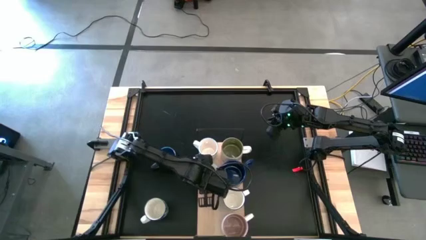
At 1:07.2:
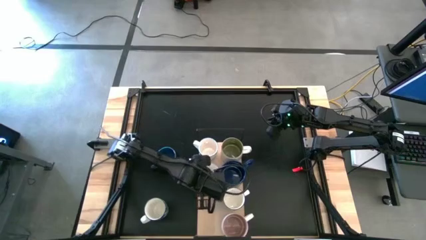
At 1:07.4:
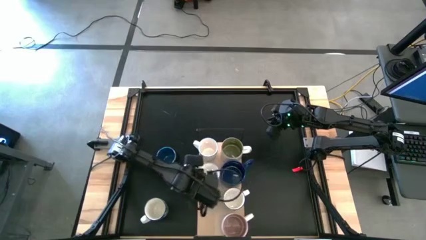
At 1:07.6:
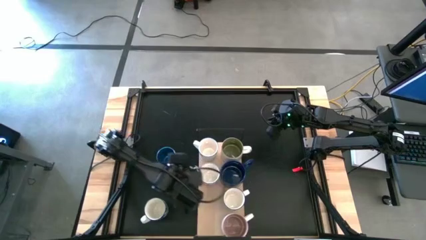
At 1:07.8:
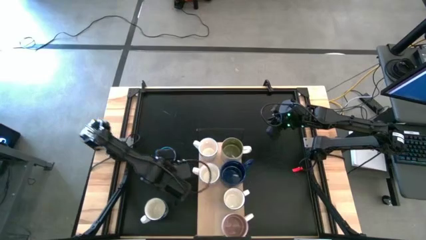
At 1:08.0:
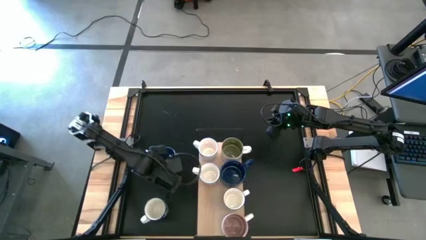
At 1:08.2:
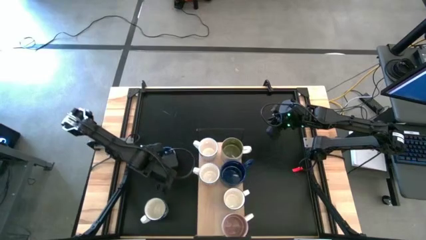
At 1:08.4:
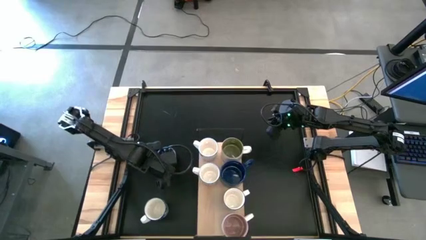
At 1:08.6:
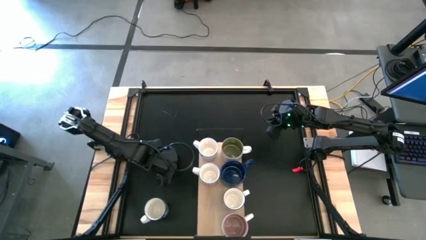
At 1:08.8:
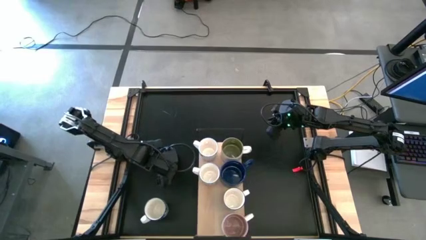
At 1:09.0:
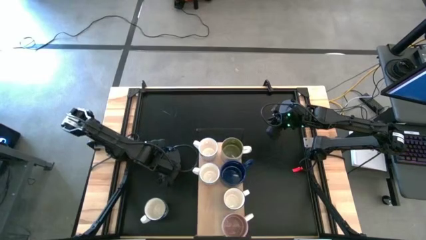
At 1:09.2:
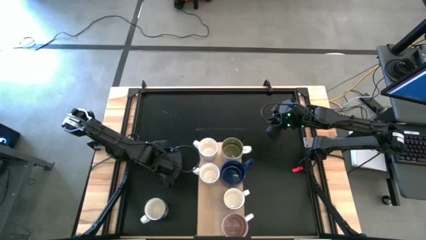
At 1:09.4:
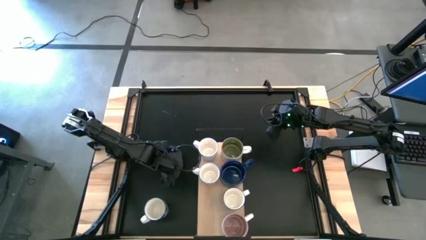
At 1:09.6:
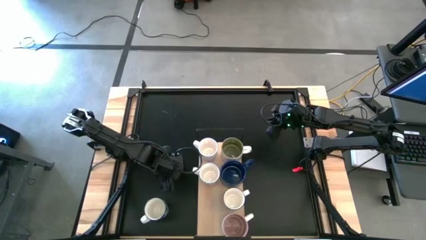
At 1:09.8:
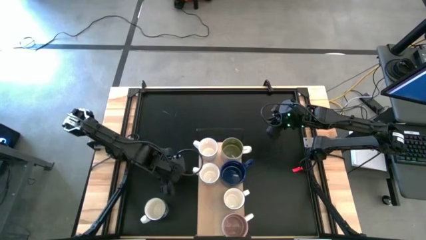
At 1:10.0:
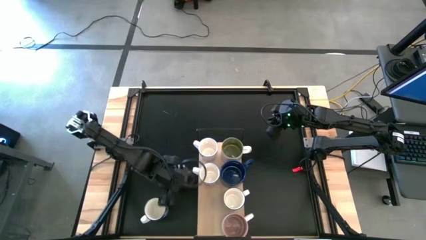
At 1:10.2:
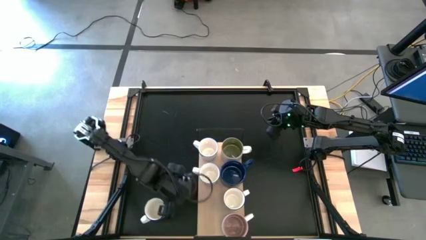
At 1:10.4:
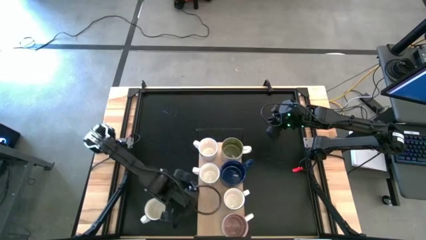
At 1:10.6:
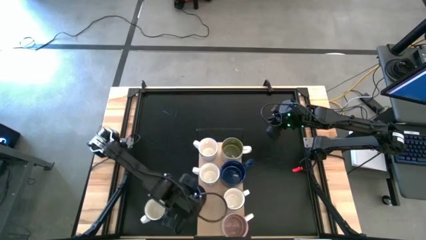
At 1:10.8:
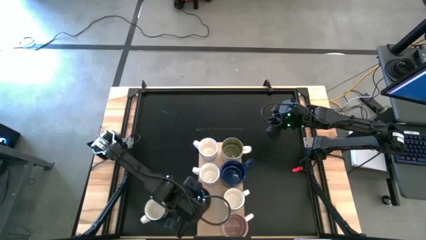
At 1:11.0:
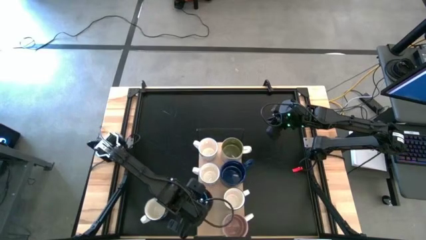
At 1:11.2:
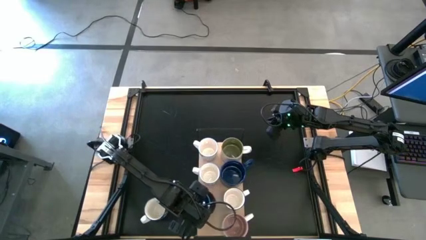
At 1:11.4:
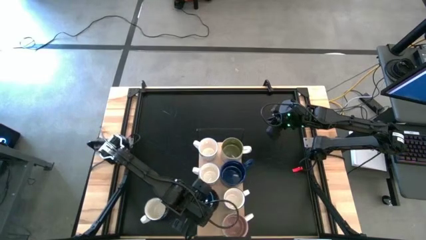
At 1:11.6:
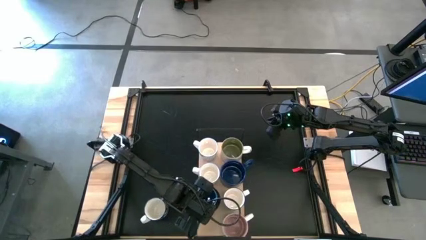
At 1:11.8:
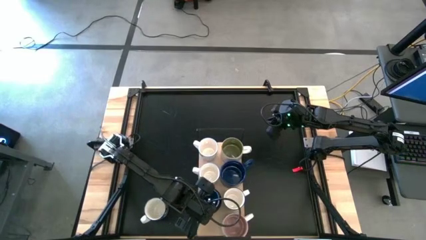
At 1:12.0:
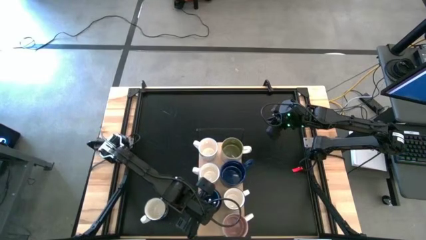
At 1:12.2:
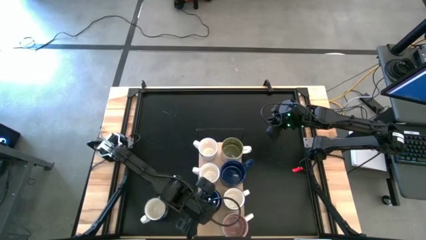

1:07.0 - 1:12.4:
Task: Place coffee mugs
Put the black mug on the shelf

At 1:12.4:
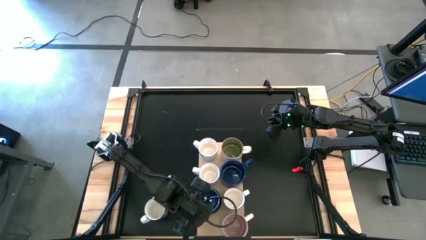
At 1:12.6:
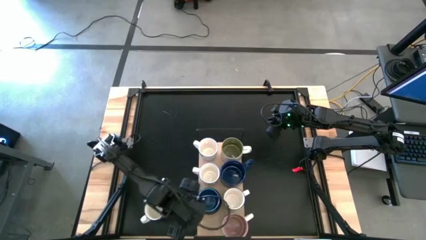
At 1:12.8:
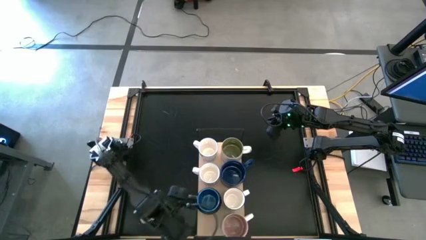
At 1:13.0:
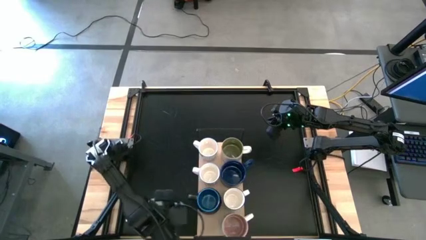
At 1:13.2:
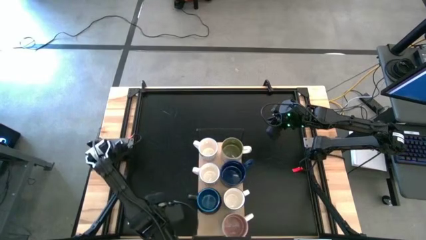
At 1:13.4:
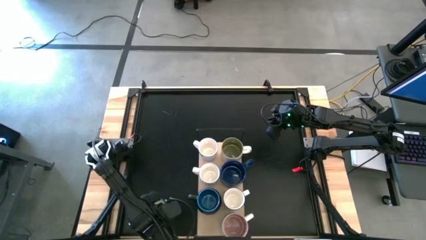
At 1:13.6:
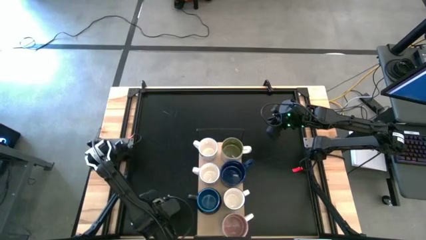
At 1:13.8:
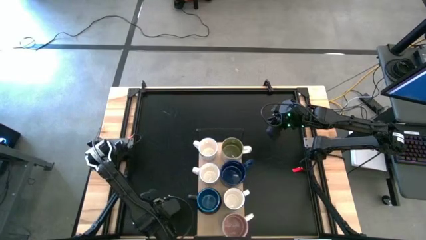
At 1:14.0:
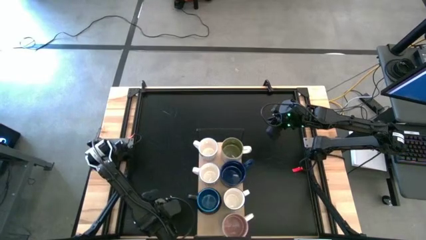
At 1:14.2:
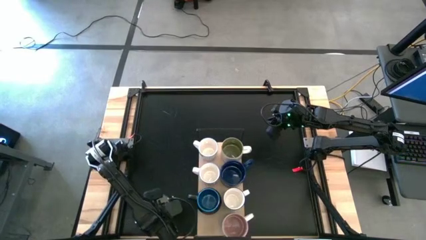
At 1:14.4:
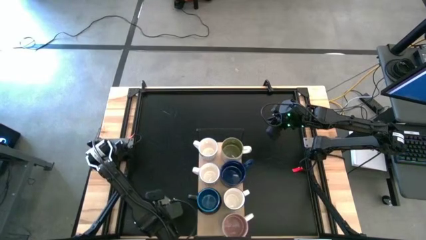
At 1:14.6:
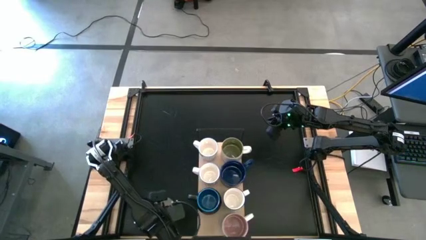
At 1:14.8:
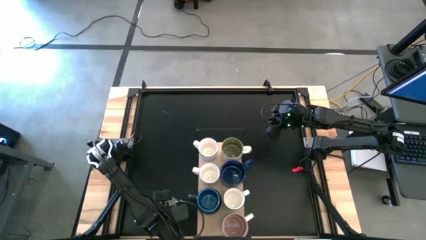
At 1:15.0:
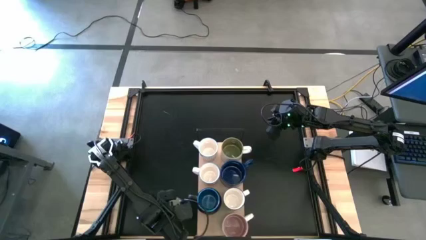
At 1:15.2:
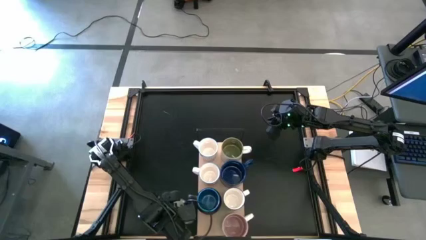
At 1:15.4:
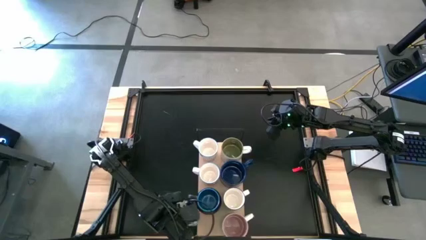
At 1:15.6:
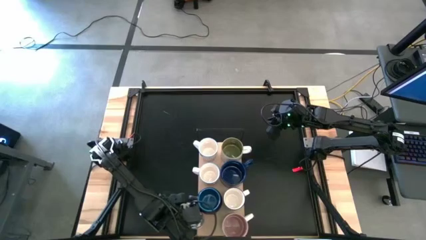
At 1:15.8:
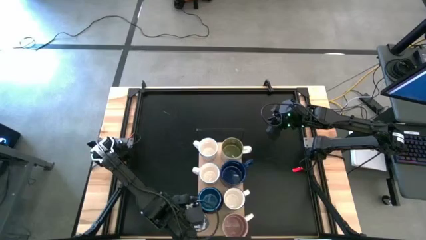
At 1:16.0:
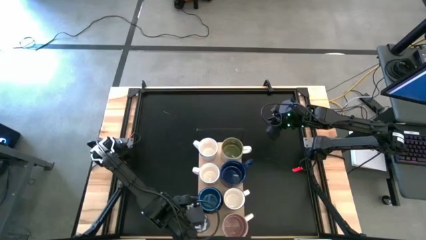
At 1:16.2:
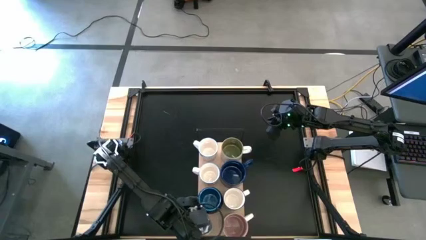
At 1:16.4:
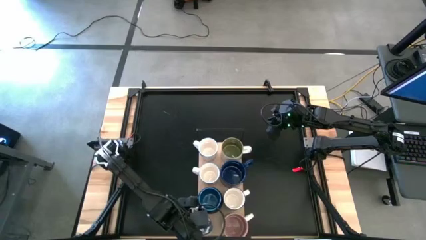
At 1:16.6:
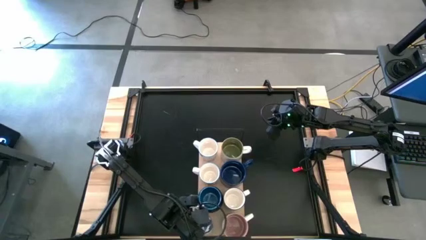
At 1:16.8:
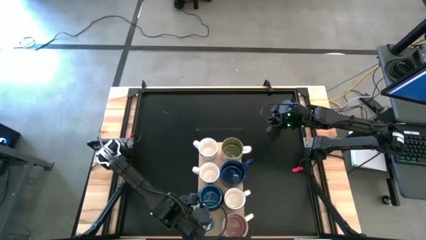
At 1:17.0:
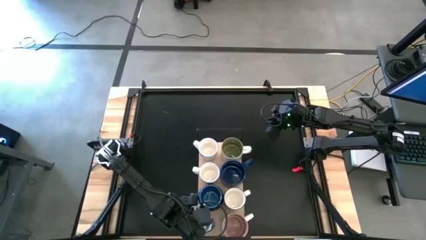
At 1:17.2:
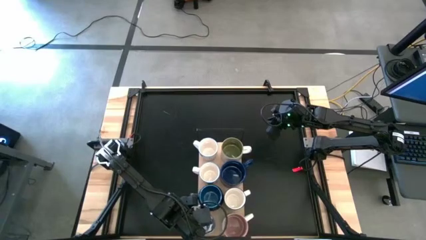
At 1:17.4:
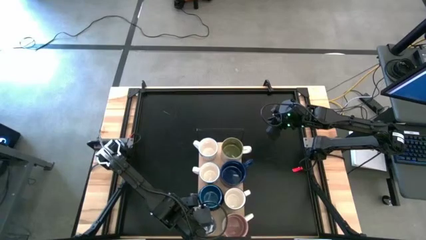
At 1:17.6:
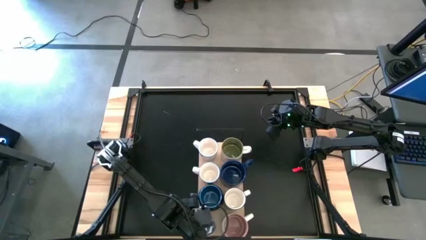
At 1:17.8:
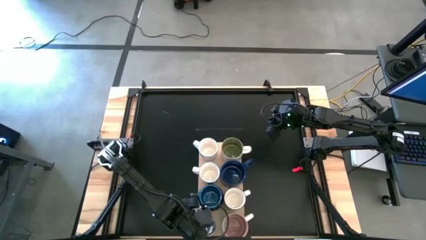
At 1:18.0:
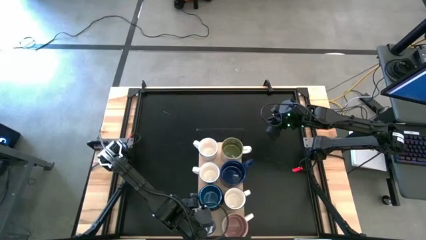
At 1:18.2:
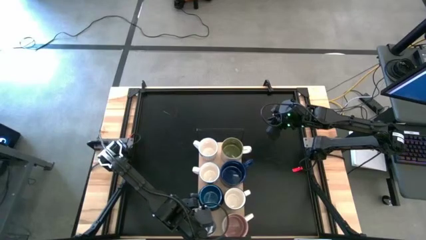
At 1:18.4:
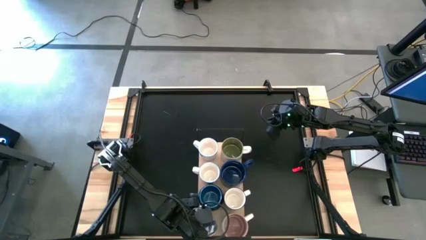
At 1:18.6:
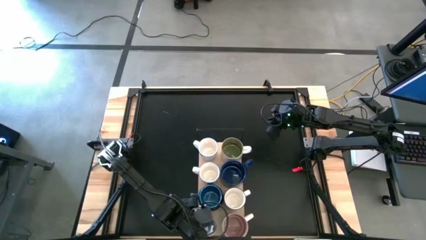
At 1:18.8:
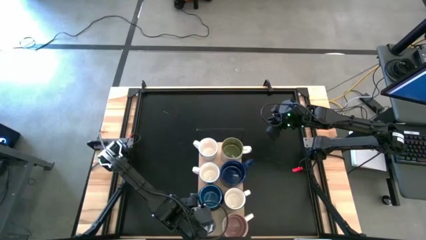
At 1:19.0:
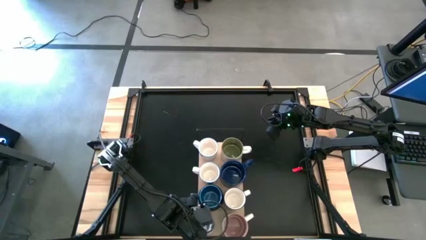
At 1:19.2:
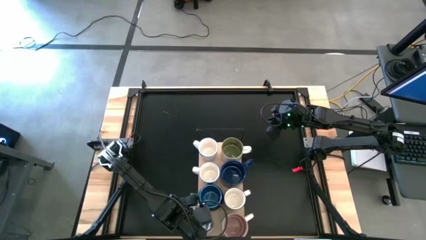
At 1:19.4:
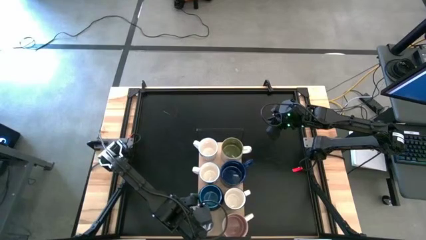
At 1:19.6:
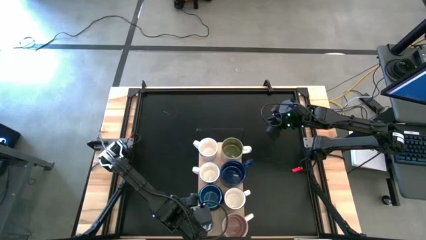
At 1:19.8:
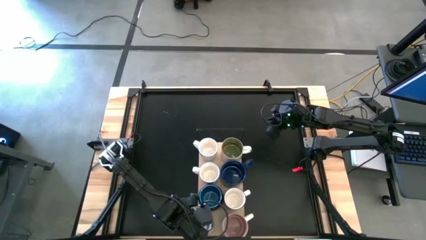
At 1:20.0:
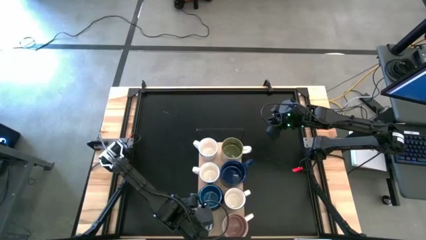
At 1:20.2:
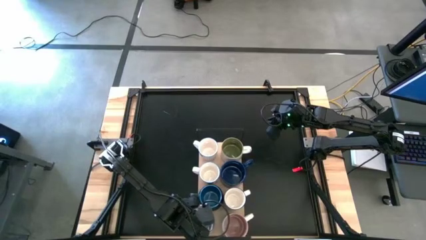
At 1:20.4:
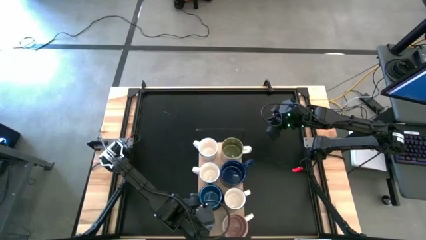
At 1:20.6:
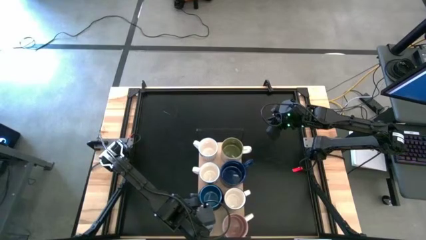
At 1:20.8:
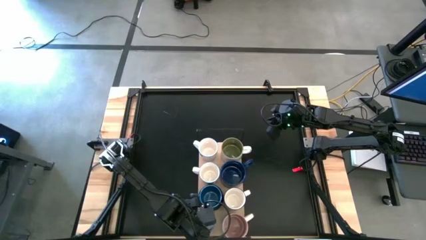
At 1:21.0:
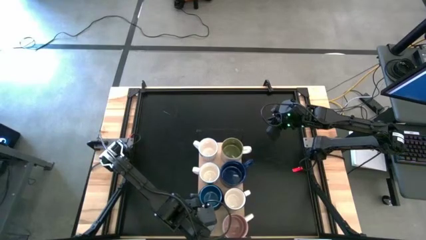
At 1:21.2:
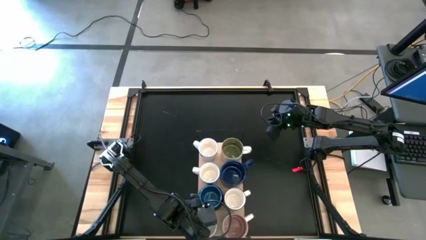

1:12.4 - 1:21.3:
Put the blue patterned mug on the shelf

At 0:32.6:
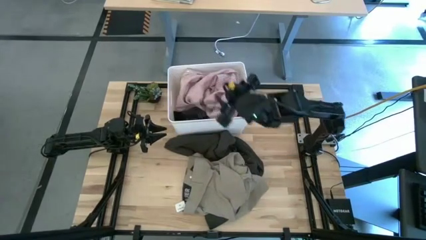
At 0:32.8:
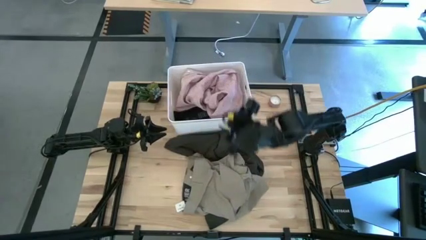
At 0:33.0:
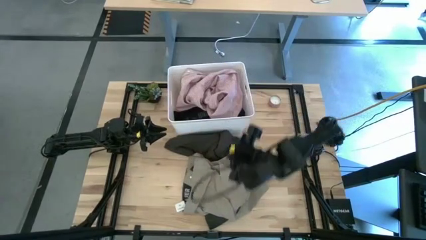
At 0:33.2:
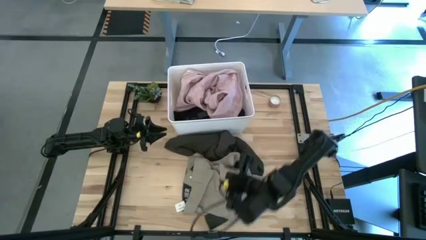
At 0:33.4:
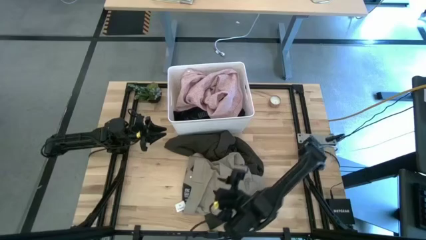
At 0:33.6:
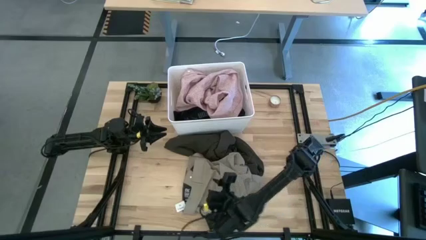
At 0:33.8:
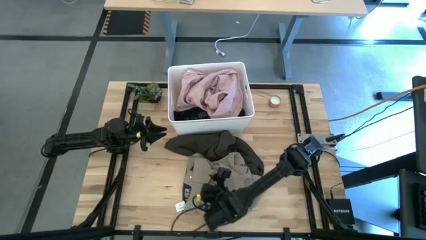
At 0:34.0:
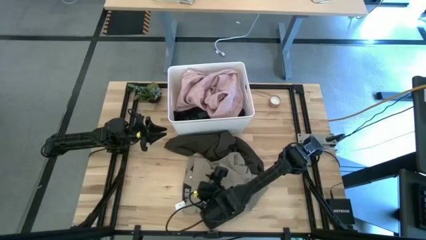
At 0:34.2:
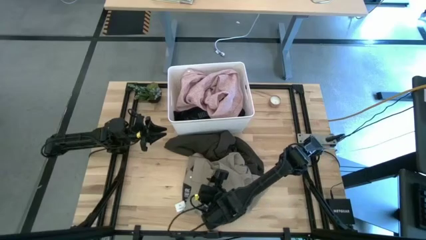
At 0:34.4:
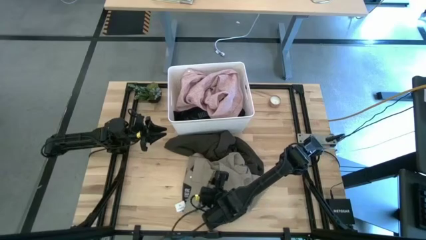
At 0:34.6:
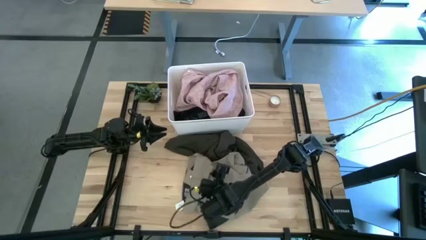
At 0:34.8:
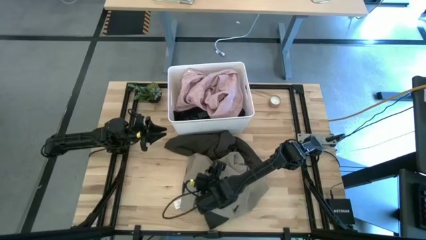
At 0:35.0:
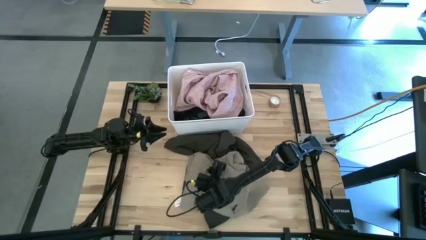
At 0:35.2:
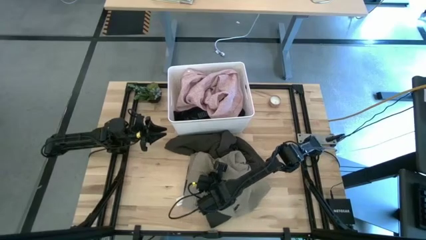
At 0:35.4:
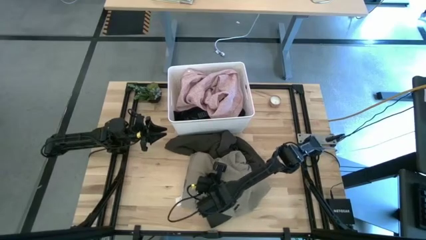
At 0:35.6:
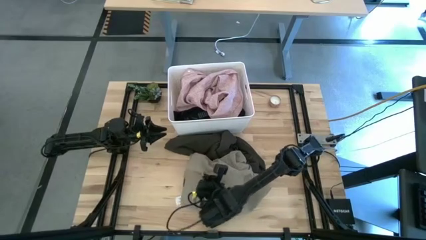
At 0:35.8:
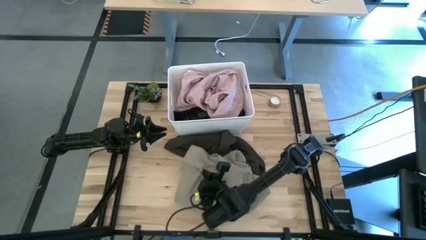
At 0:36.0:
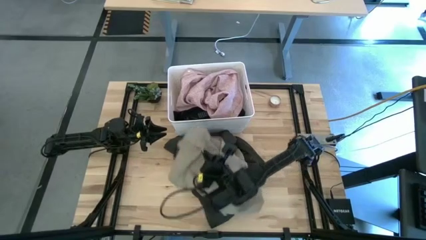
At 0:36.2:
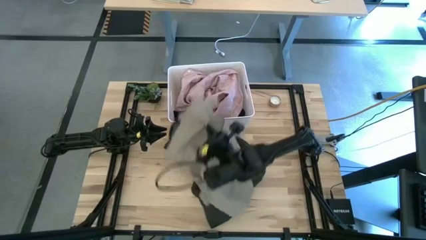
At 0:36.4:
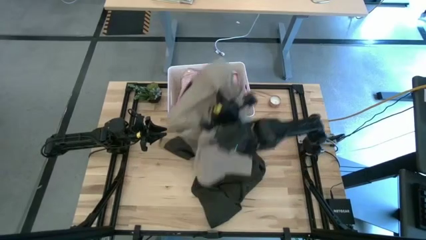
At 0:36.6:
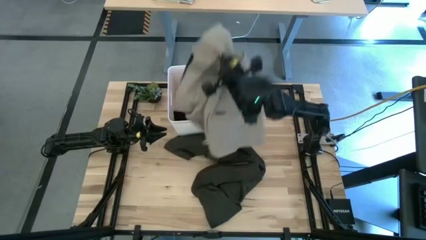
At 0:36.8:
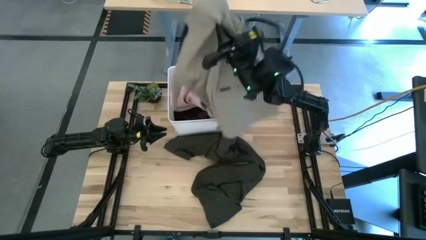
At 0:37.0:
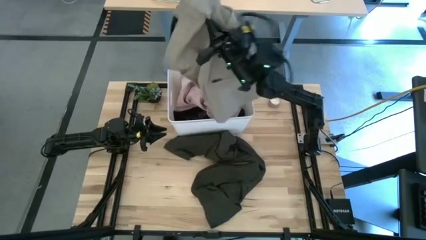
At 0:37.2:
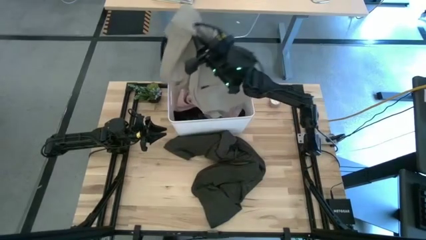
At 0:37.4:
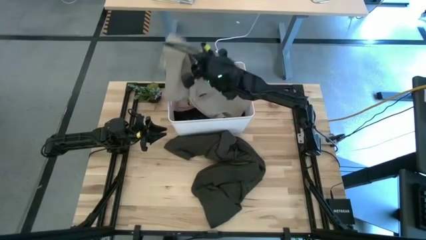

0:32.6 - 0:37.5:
Task: Sort clothes
Put the brown pants into the white bin
